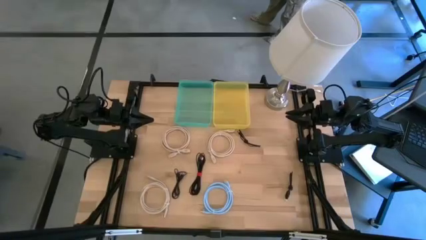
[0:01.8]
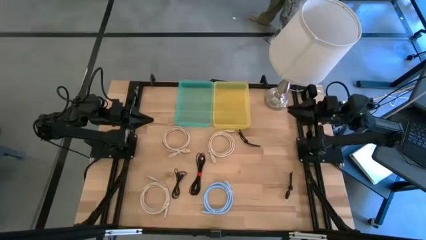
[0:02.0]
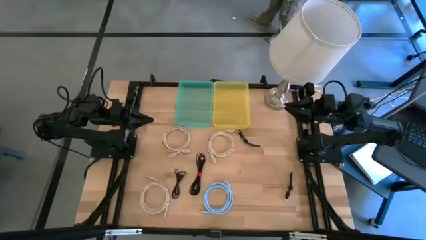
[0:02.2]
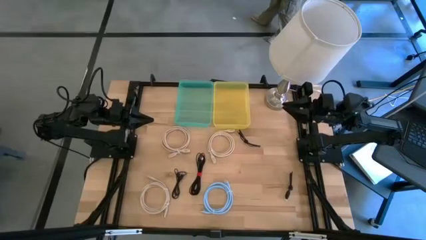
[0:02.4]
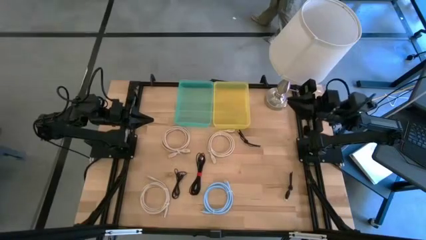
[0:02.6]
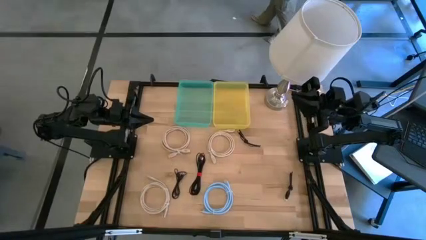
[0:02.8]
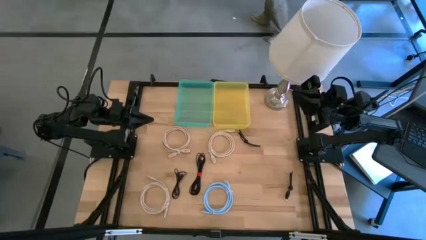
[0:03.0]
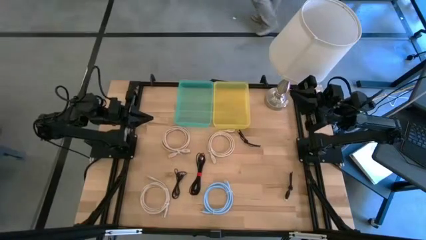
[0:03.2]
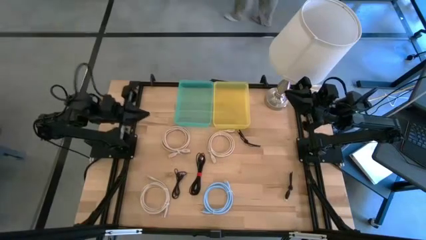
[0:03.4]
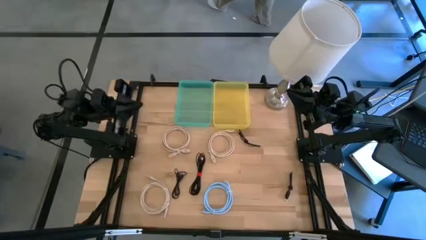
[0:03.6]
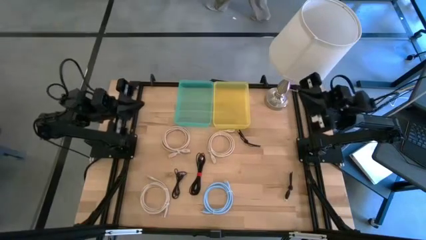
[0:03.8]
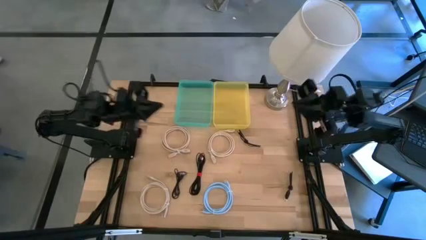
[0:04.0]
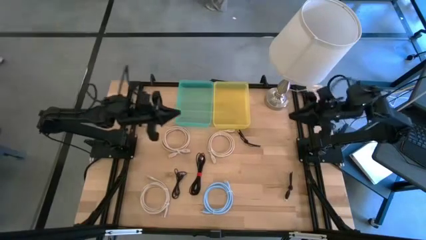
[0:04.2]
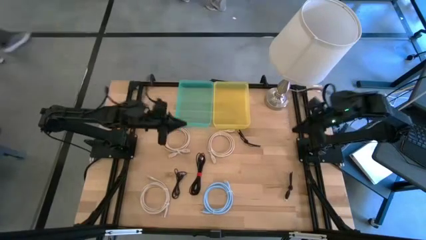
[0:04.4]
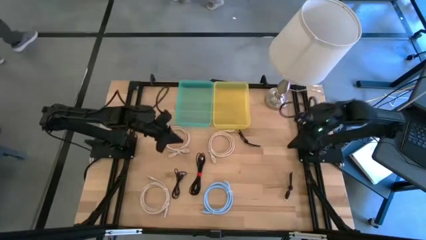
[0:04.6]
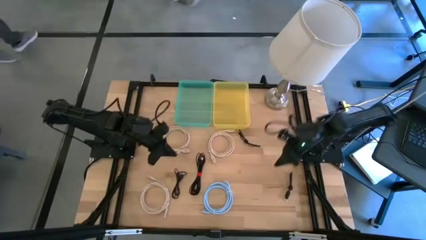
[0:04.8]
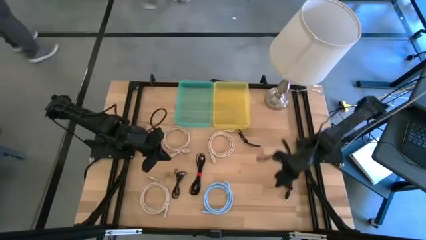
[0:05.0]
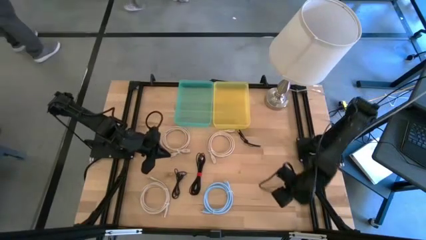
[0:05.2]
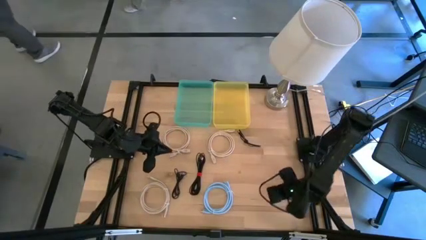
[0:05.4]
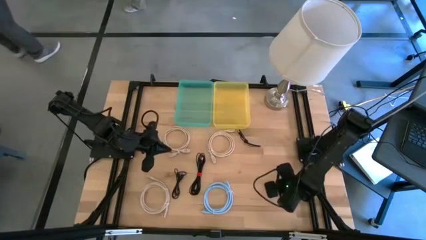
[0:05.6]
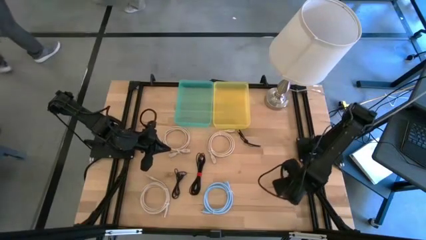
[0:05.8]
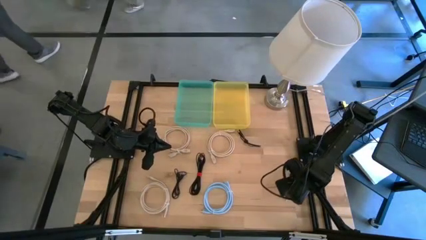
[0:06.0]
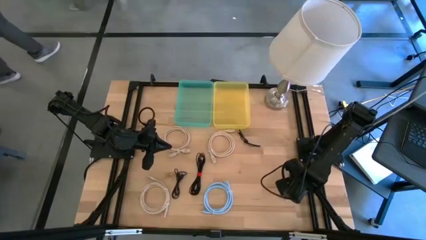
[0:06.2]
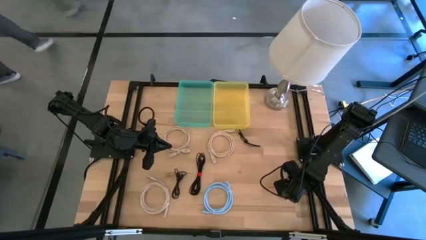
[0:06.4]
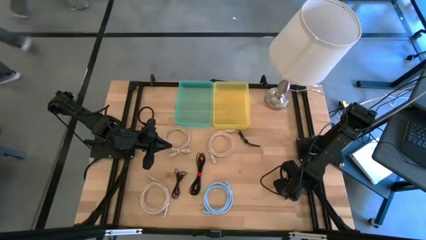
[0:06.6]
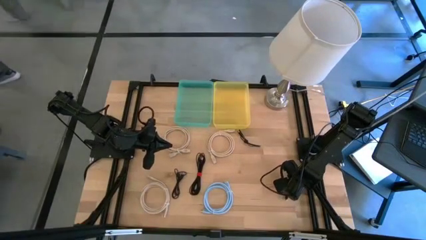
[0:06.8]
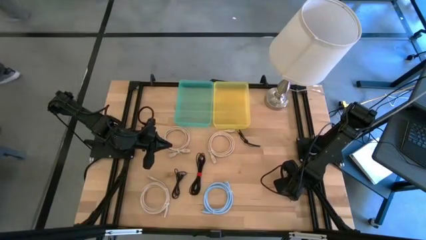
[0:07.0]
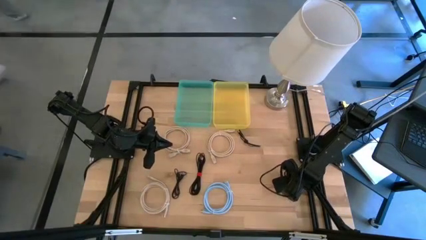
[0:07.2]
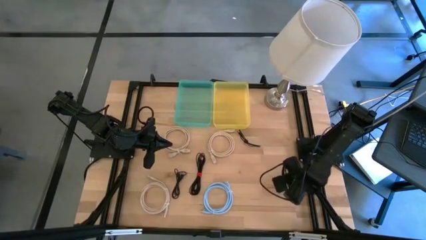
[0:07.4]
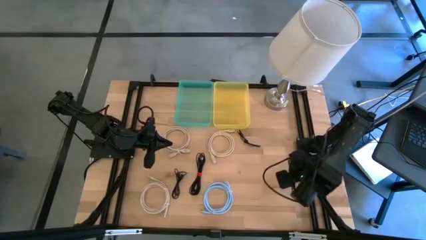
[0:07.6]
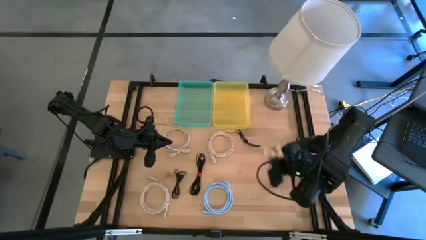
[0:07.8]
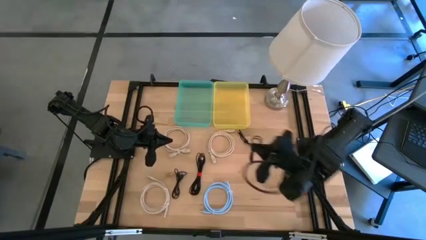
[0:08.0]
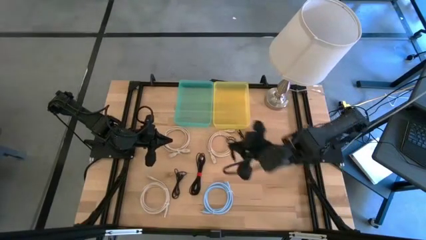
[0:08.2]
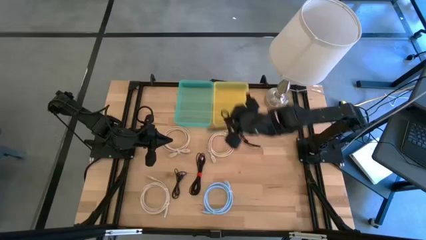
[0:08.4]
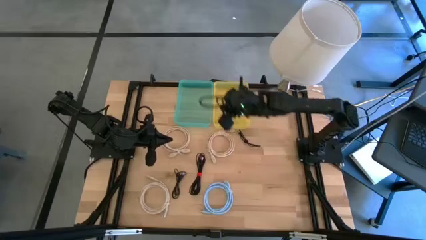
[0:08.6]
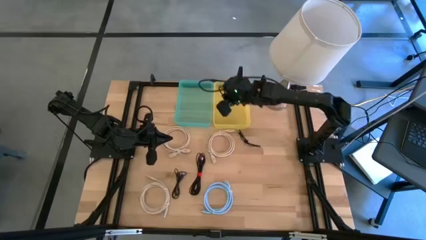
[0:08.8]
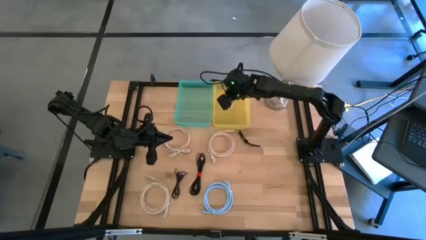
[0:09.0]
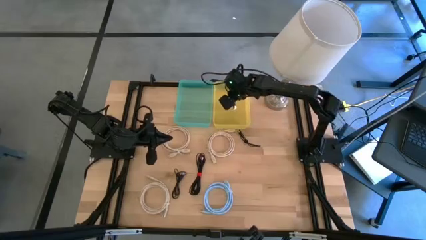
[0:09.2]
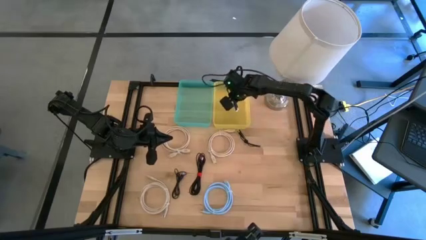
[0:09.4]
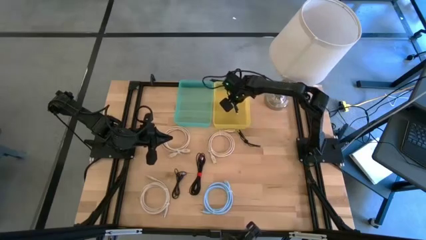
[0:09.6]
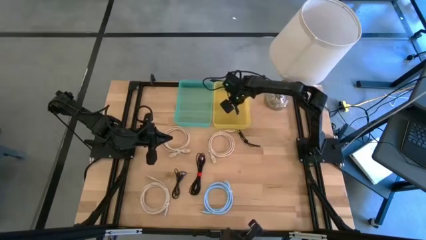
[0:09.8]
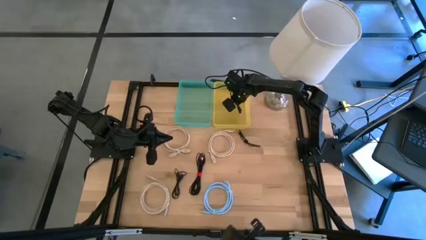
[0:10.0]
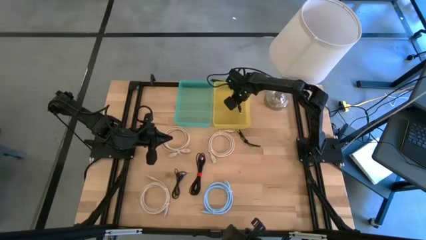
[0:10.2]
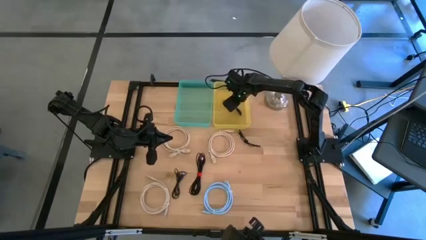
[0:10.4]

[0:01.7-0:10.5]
Put the bottom right black charger cable into the yellow bin

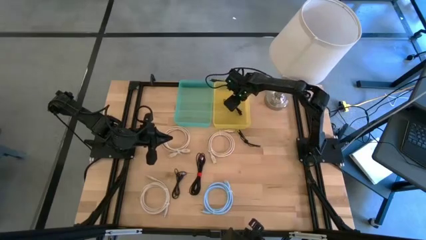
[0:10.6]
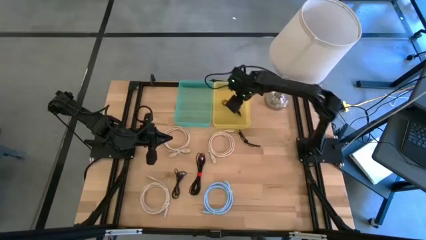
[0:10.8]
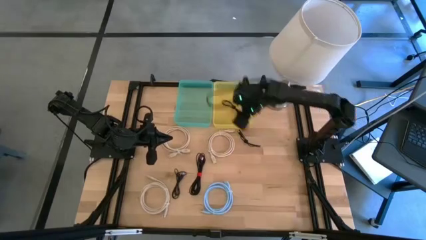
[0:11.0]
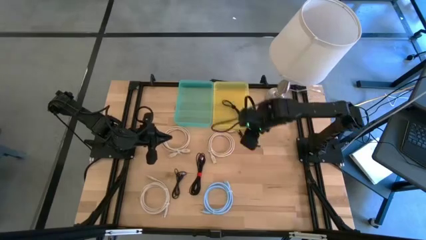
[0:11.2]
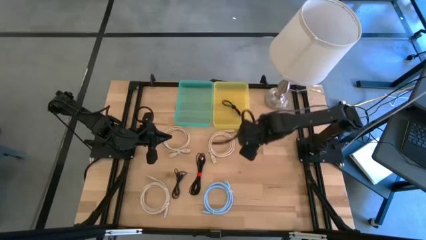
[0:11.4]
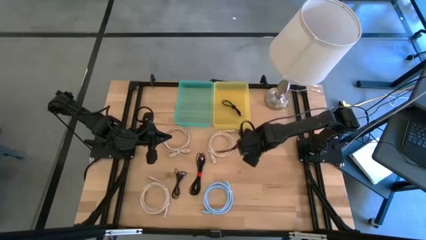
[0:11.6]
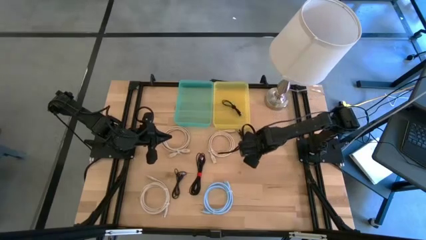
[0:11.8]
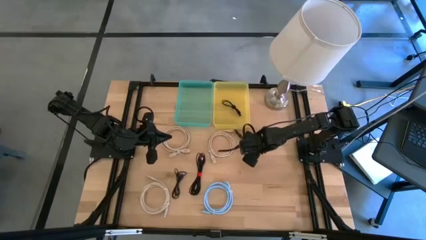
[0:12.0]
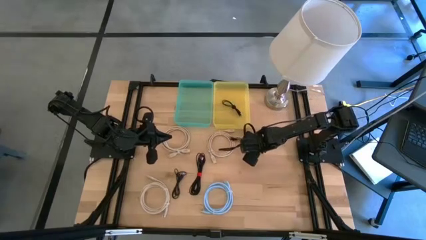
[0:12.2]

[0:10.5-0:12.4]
Put the top right black charger cable into the yellow bin

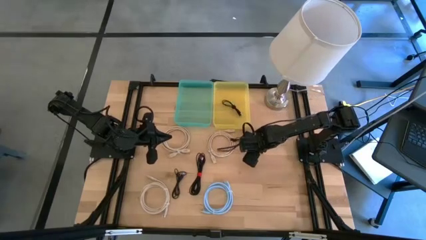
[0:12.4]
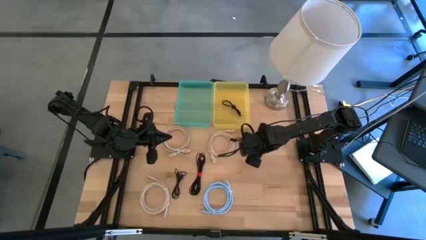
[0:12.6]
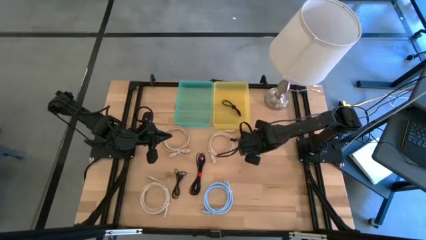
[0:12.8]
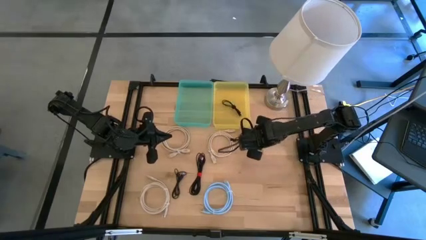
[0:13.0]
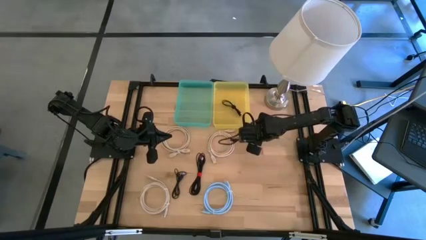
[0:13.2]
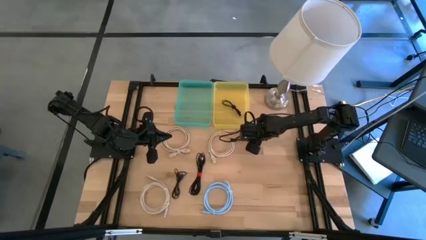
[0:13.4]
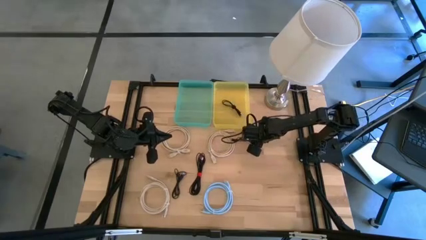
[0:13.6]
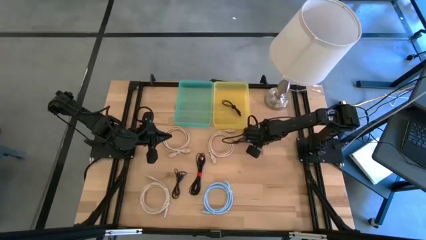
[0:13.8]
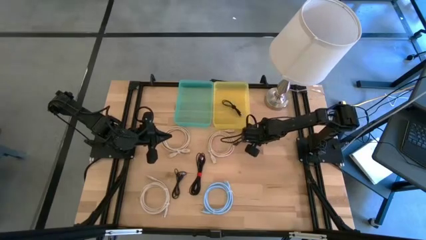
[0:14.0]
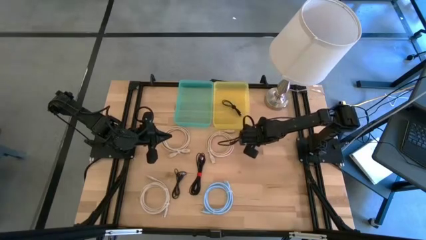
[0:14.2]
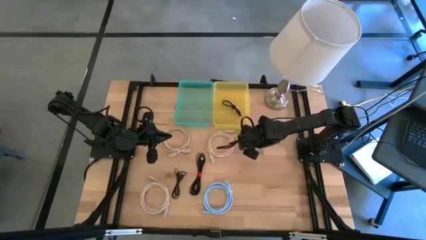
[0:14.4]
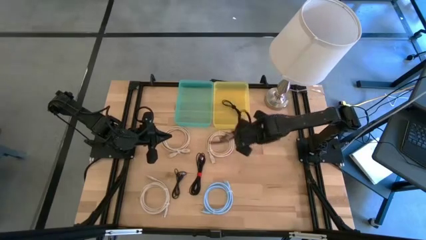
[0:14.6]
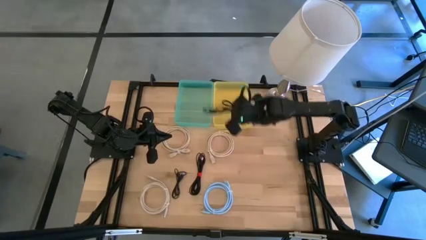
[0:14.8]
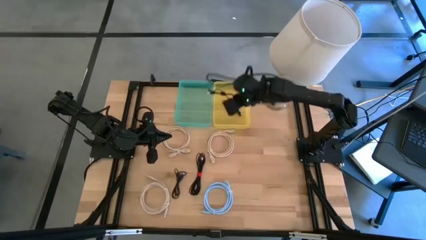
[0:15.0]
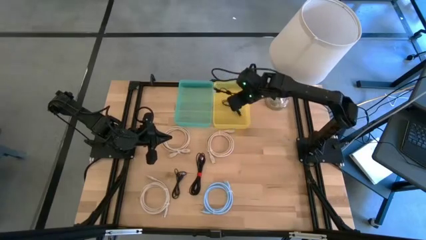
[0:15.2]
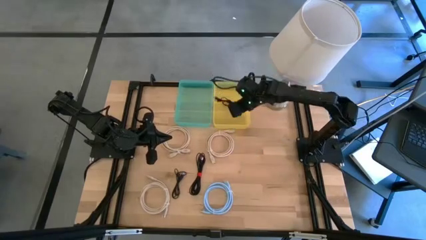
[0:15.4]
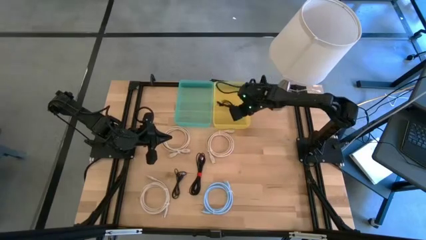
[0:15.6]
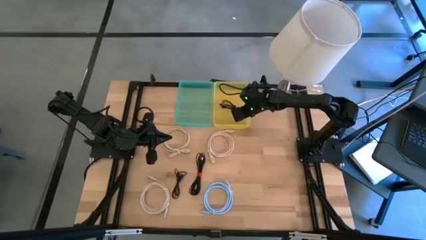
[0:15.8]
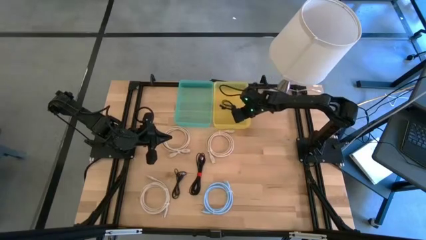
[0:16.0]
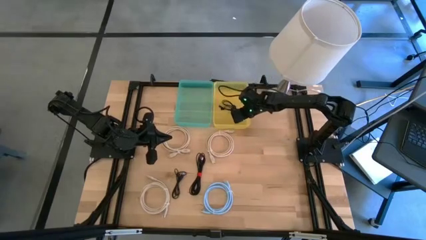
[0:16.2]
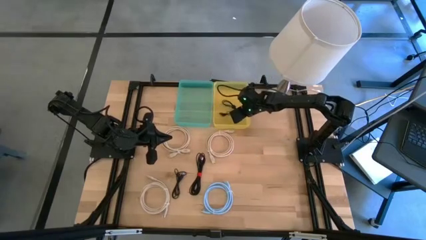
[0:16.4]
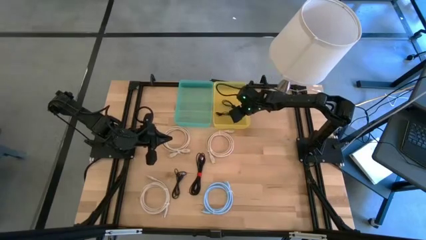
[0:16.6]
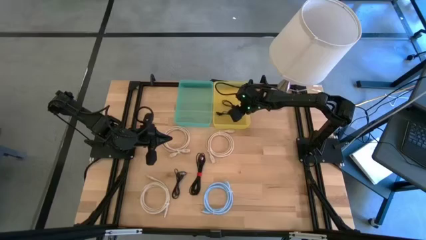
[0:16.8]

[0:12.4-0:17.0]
Put the top right black charger cable into the yellow bin
